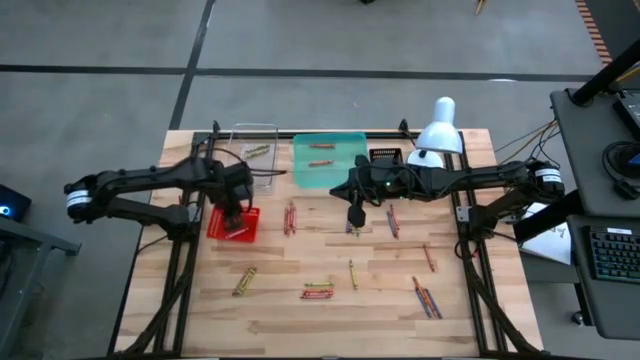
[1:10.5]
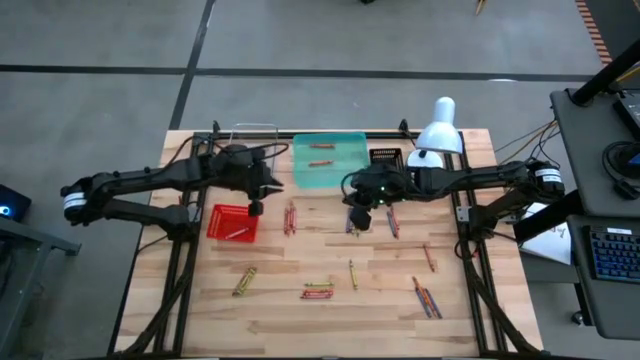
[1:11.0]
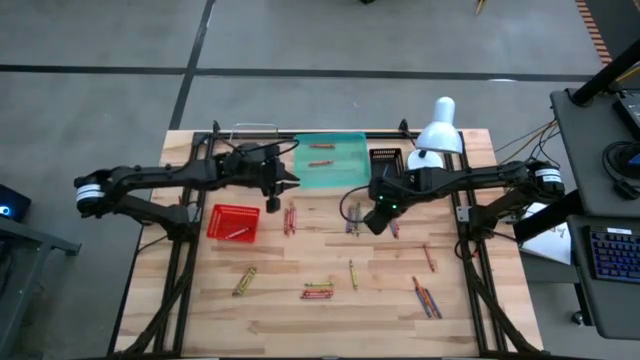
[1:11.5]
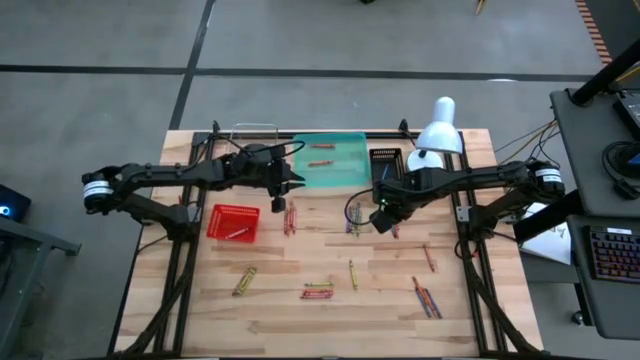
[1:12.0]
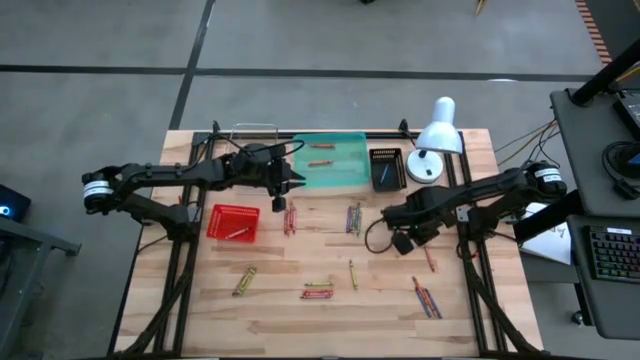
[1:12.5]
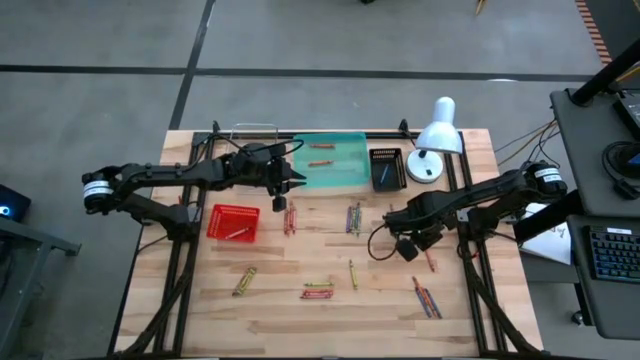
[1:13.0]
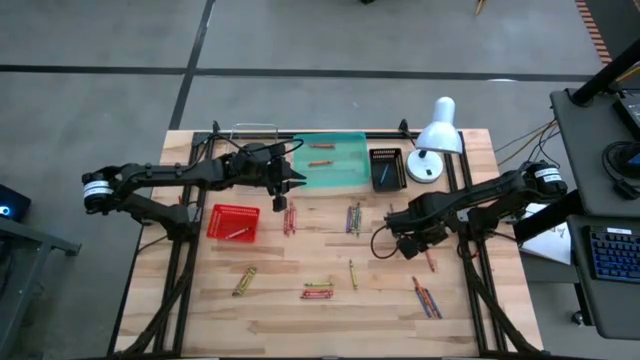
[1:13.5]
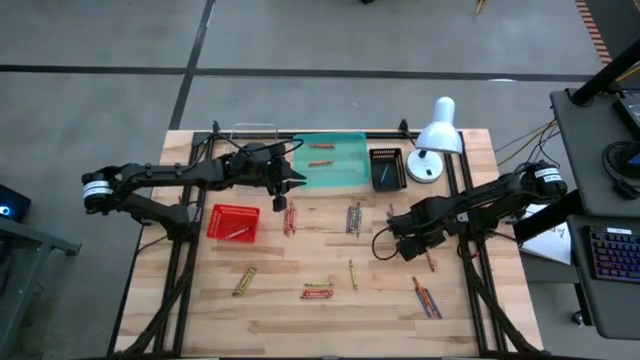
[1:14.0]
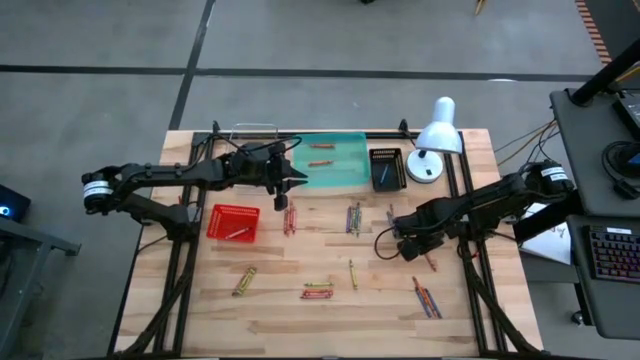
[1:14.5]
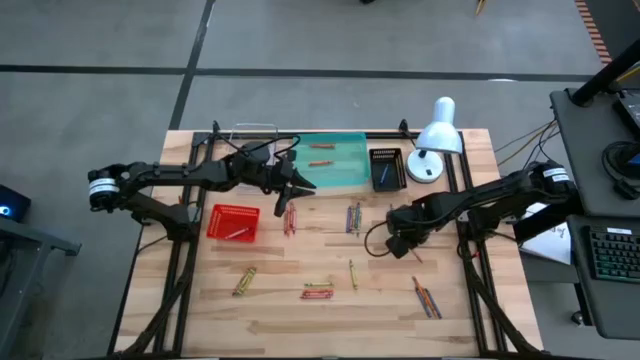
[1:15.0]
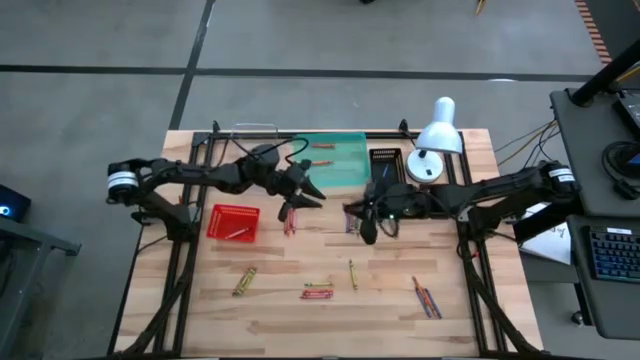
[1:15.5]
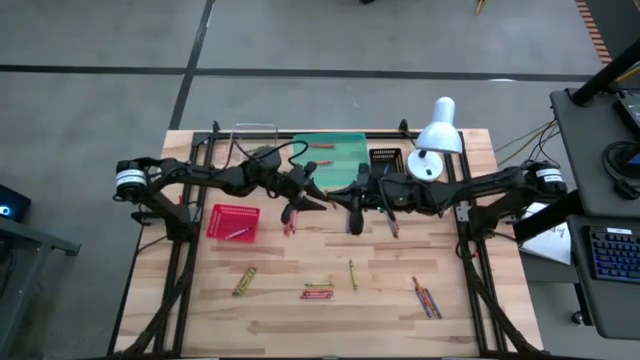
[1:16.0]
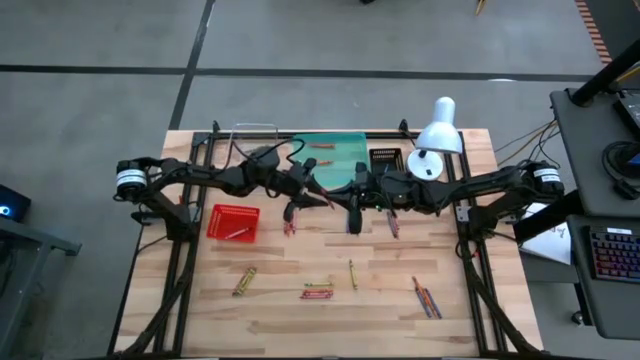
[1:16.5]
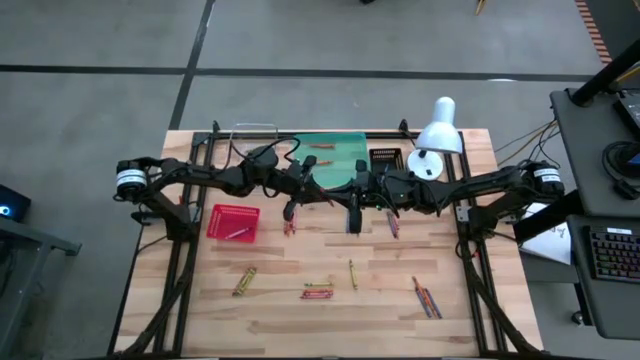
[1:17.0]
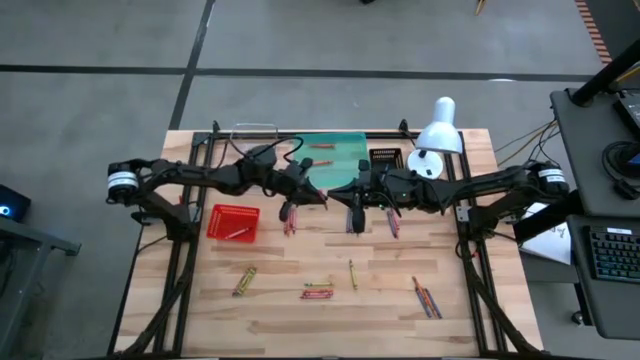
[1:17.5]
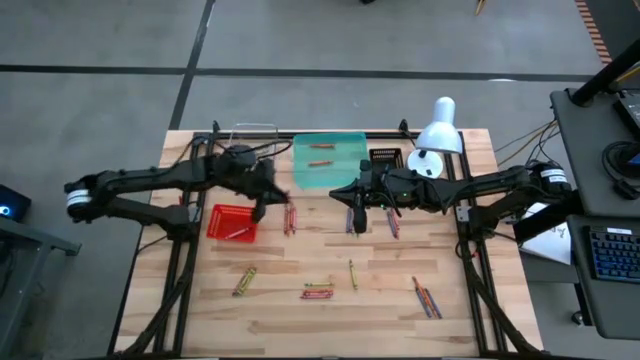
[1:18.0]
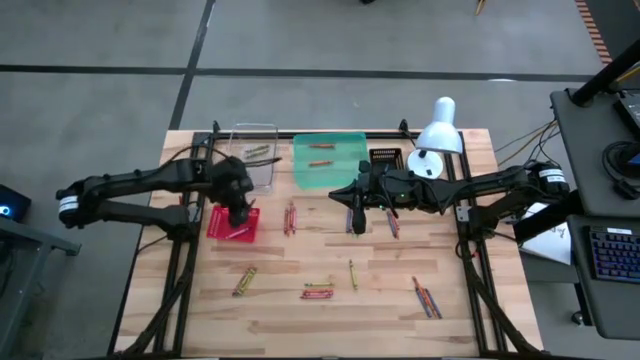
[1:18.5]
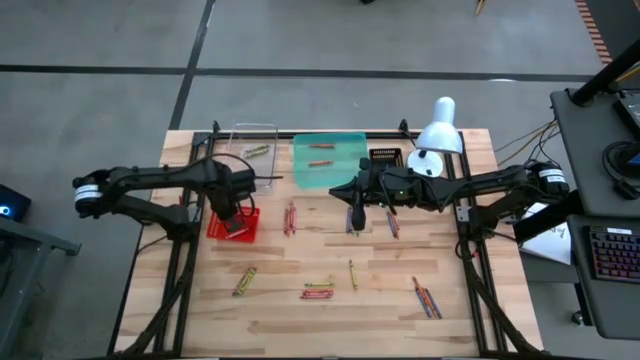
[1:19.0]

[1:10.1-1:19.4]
Task: Sort crayons
Put the red crayon into the red bin

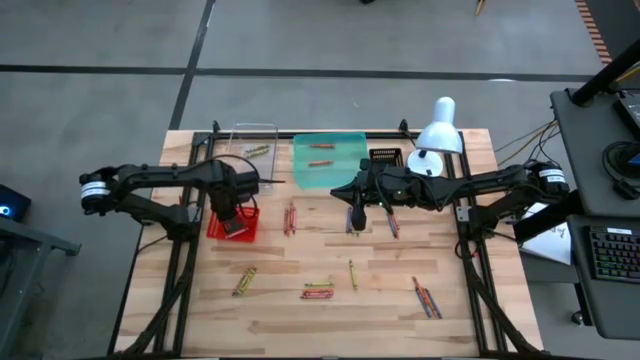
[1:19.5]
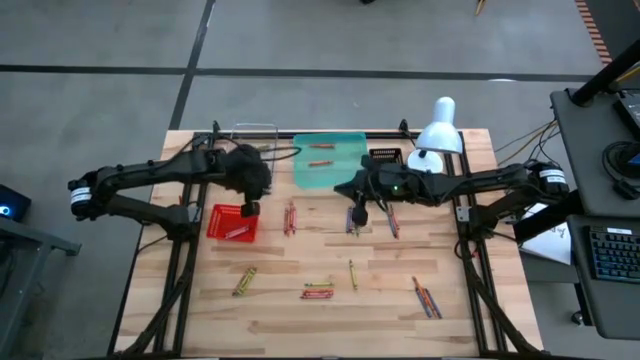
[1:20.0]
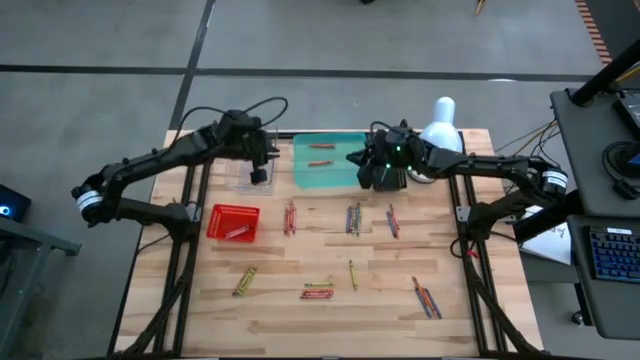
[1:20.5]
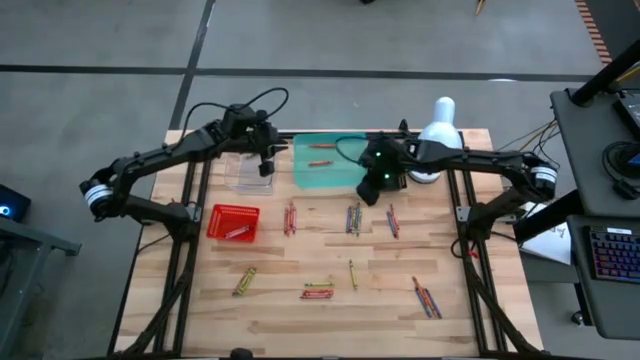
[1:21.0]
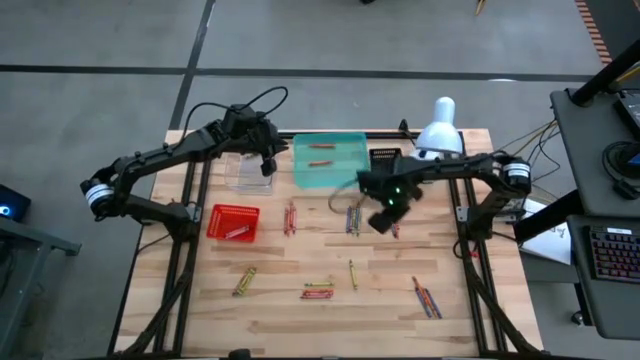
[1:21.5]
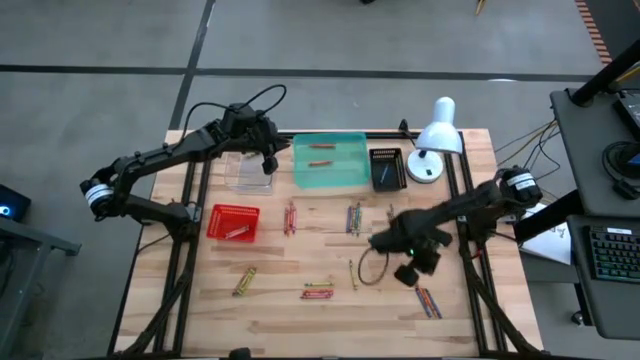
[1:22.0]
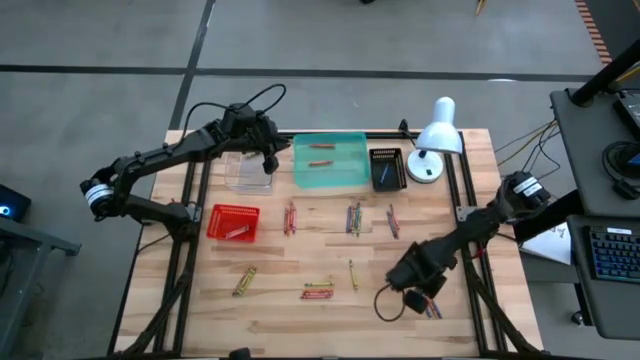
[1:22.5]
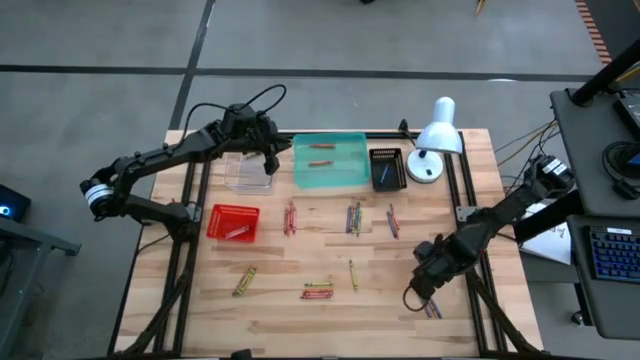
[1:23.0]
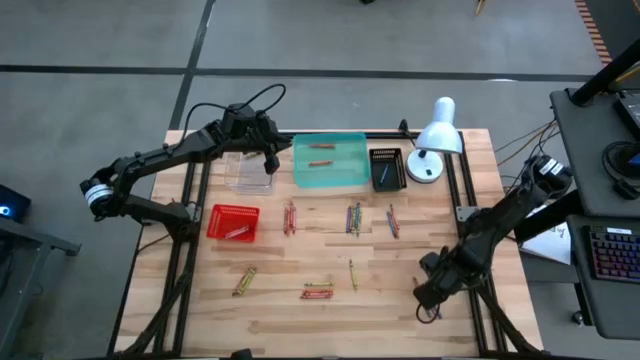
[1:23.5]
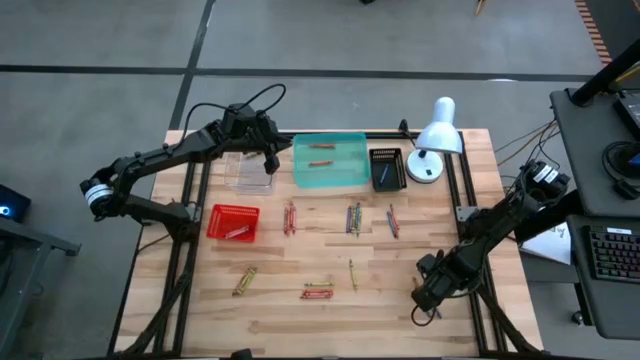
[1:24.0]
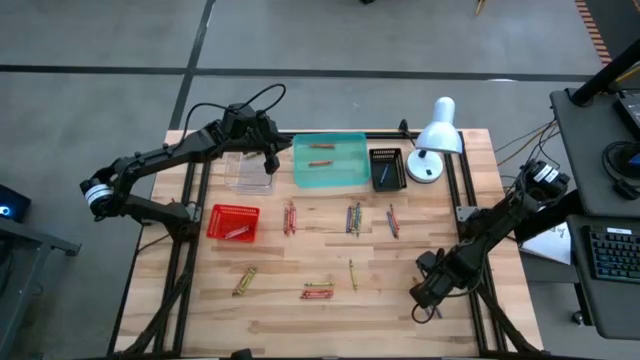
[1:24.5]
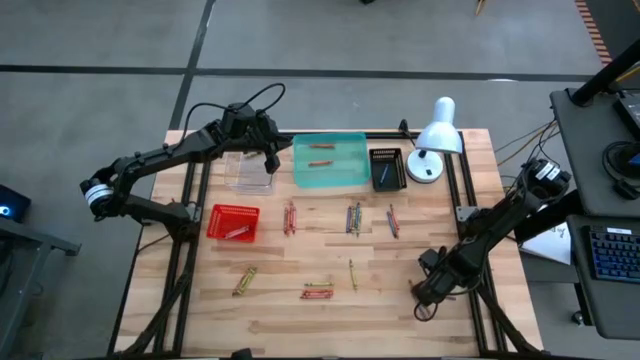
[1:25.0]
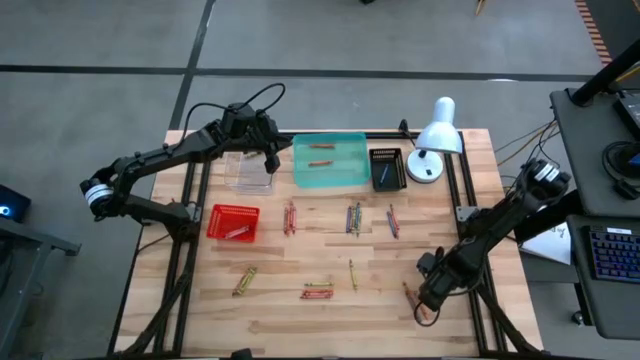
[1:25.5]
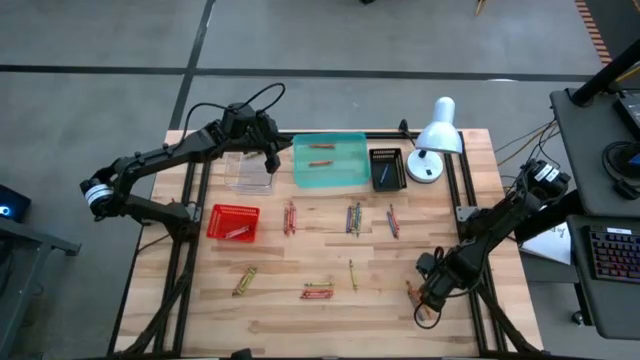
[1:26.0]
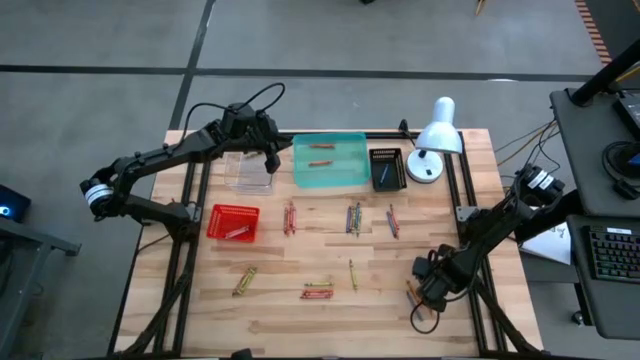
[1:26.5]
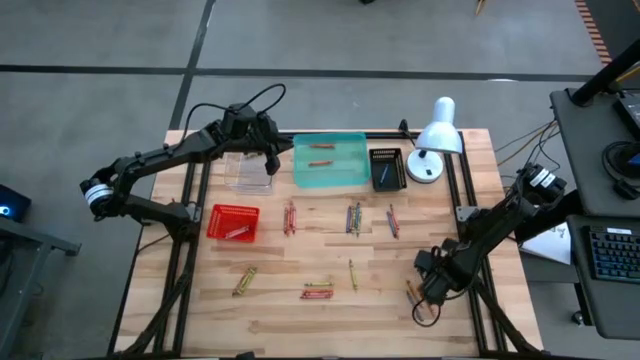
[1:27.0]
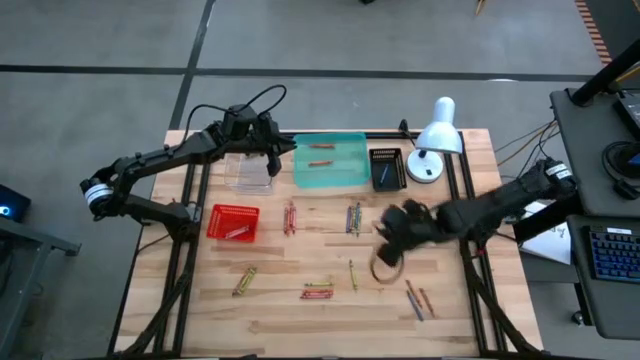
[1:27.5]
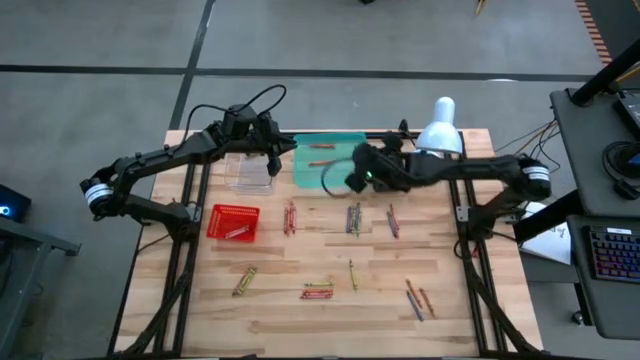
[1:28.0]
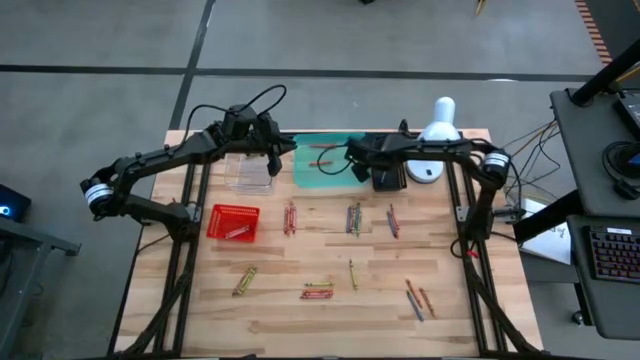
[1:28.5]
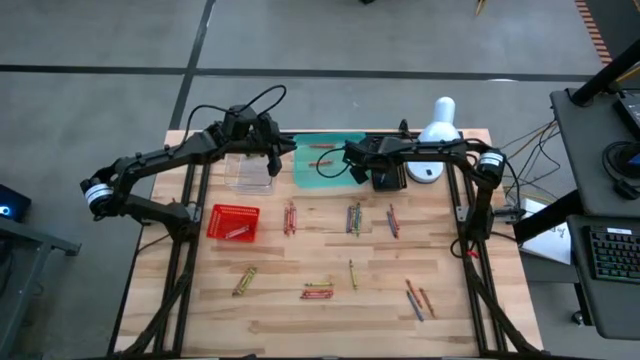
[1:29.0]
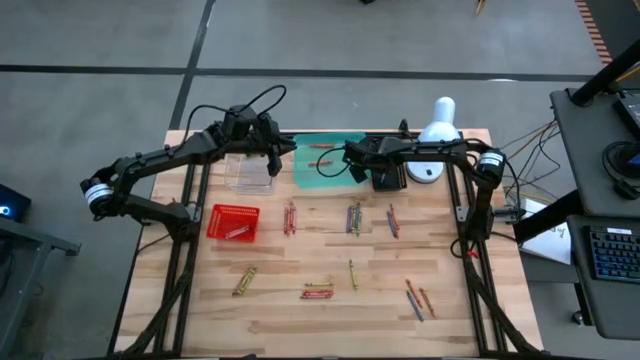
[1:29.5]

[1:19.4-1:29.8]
Put the blue crayon into the black bin
